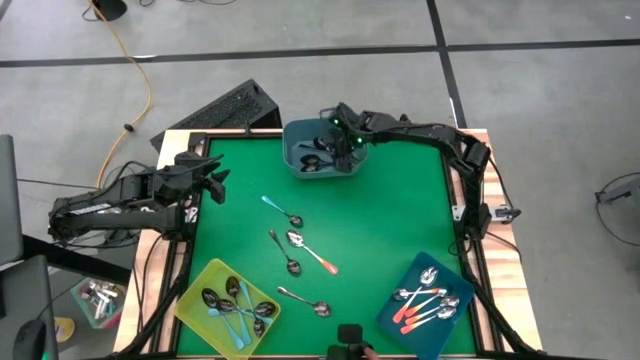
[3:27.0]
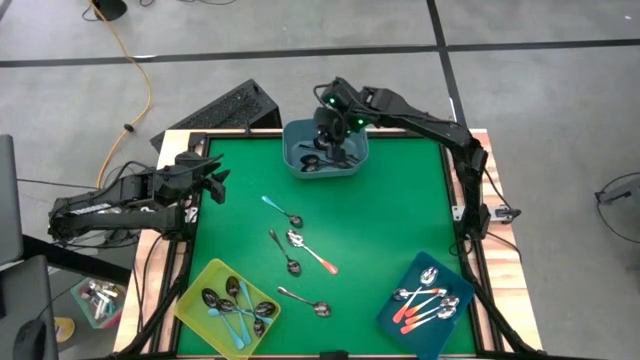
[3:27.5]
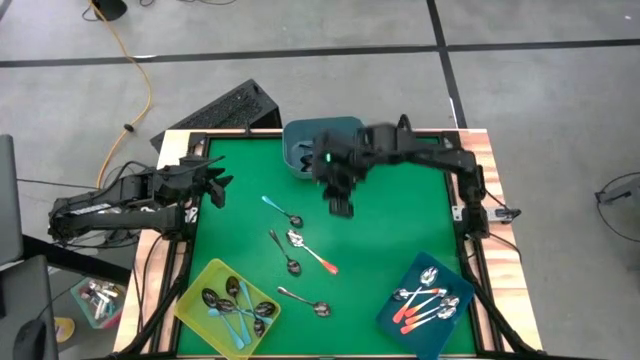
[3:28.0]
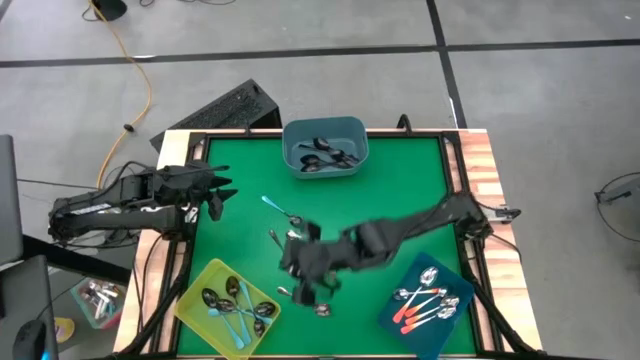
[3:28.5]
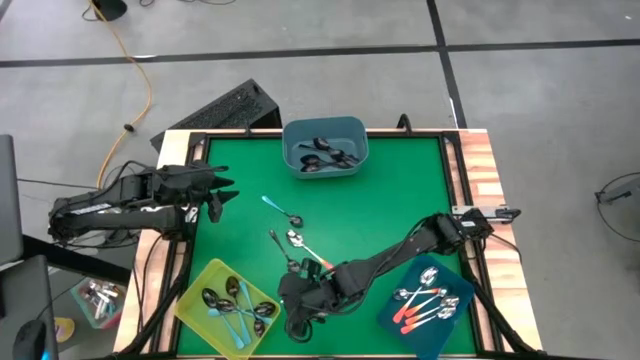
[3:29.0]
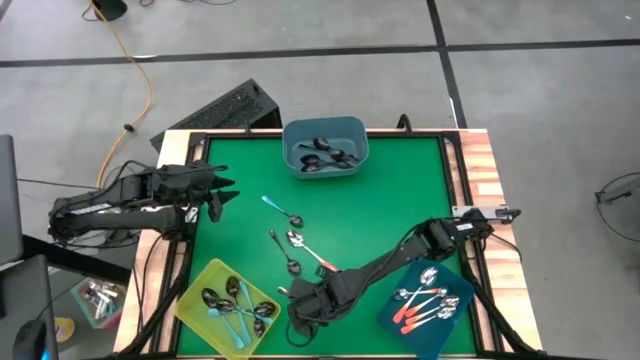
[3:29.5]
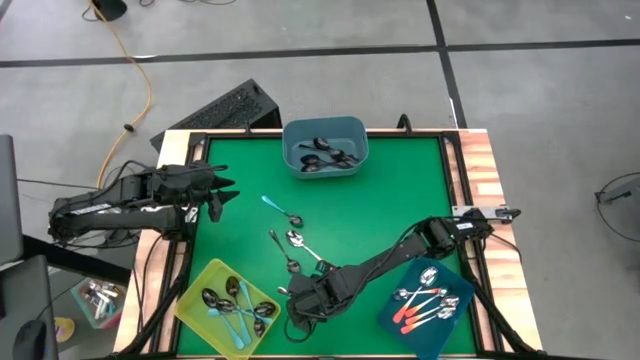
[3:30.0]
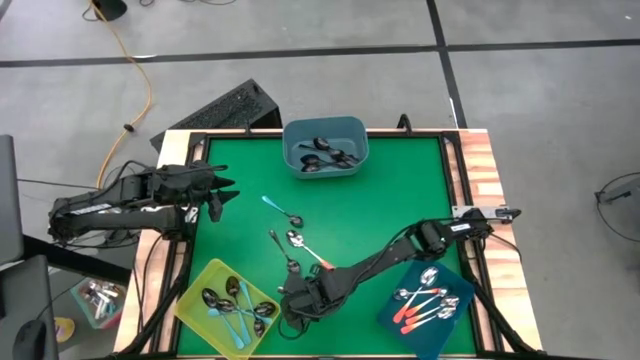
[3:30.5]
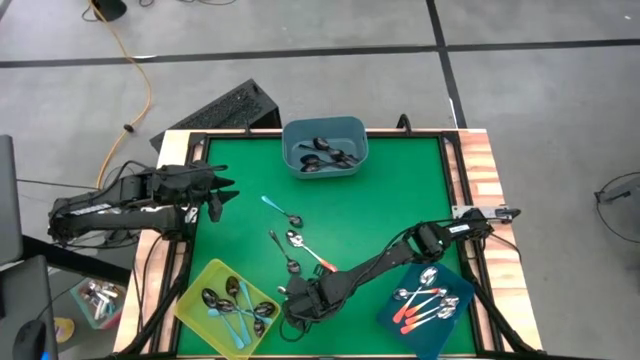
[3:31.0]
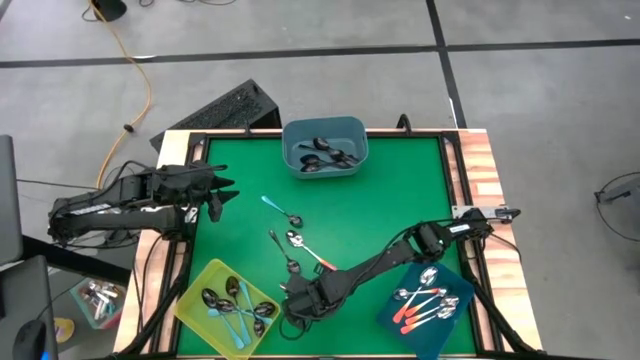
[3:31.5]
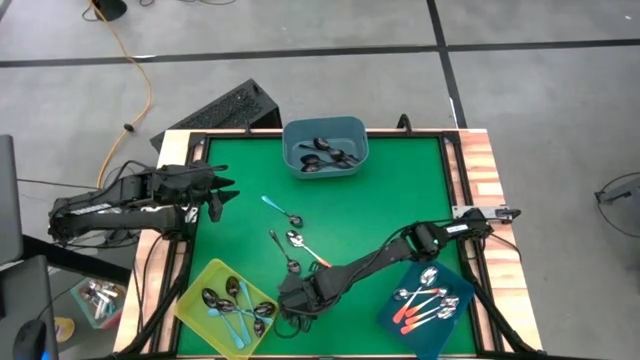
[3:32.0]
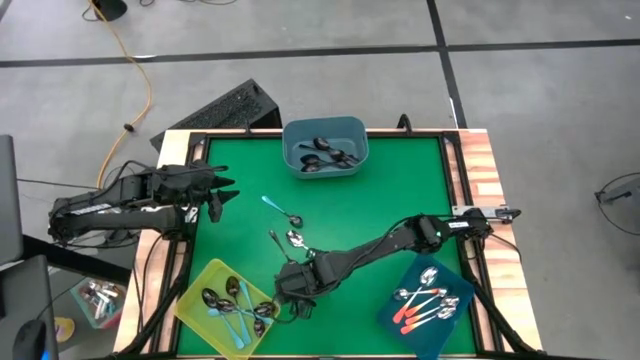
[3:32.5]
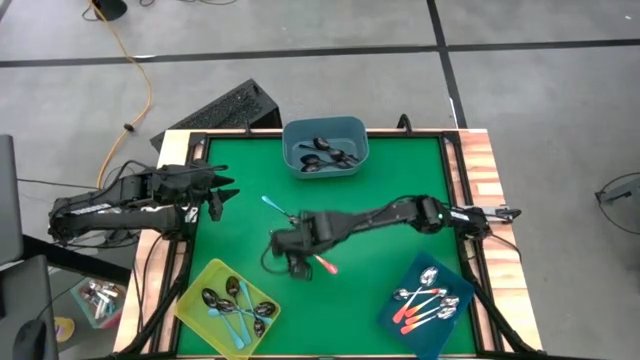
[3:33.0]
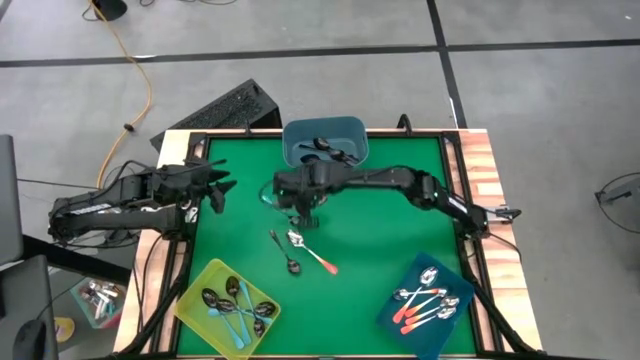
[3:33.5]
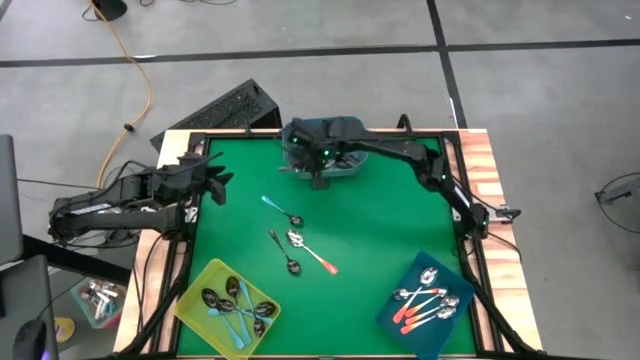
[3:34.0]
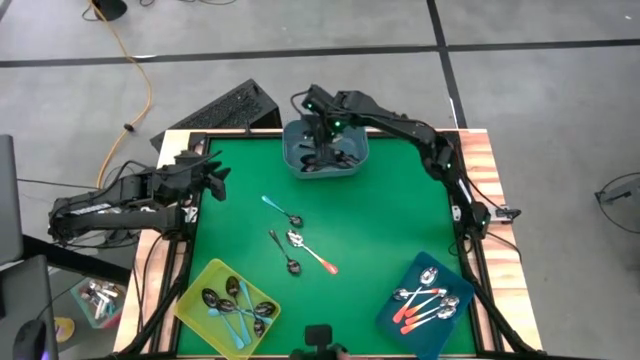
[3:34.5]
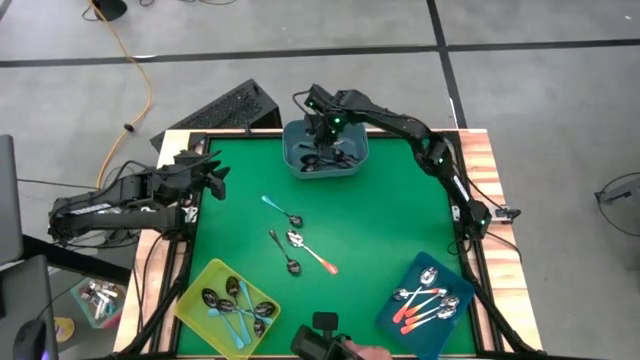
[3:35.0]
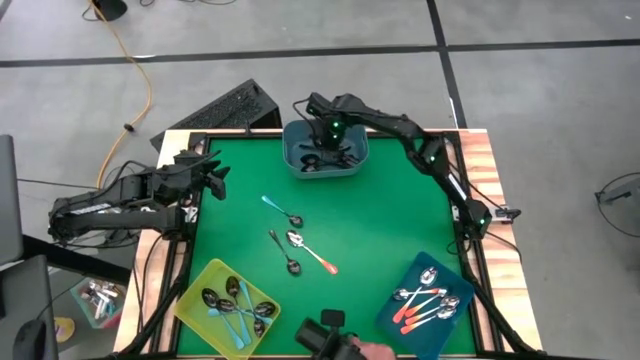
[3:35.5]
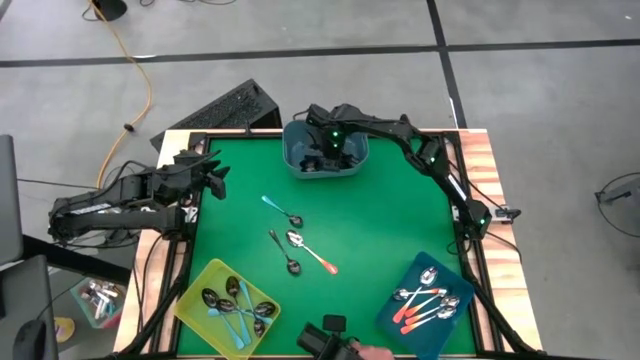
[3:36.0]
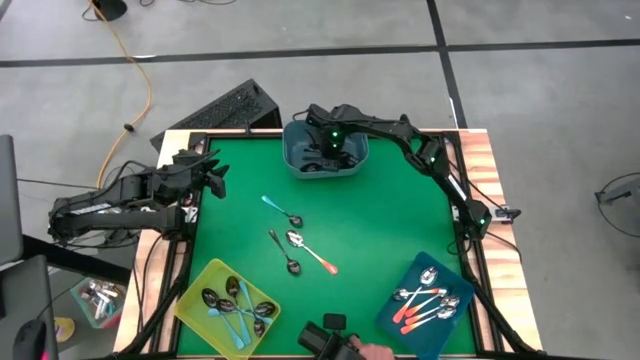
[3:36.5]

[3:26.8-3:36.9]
Task: Sort silverware by color (type)
Put the black spoon into the light blue bin

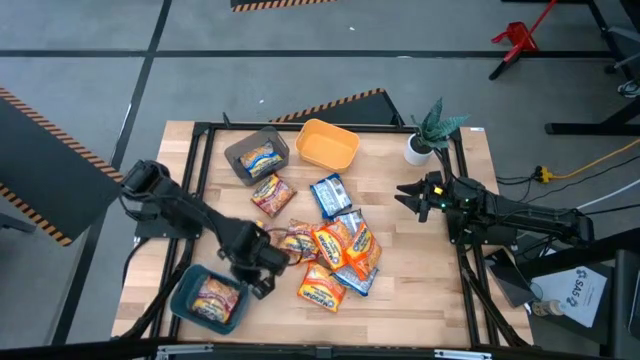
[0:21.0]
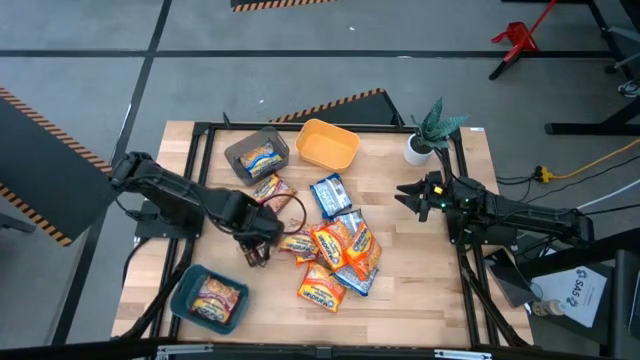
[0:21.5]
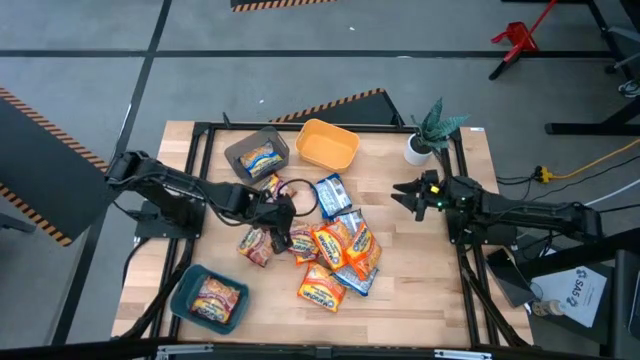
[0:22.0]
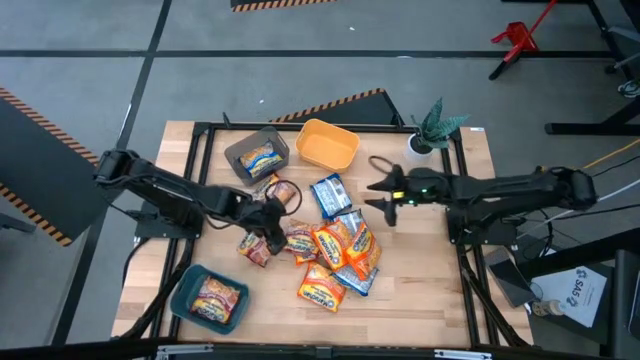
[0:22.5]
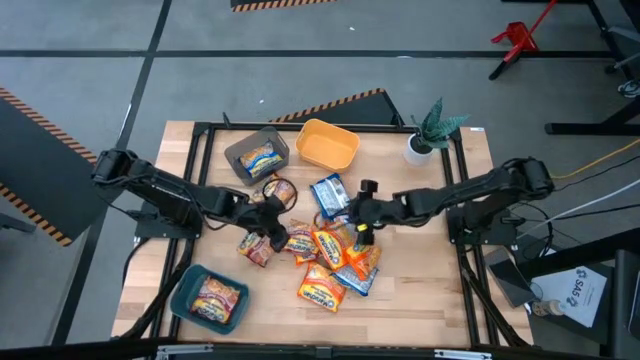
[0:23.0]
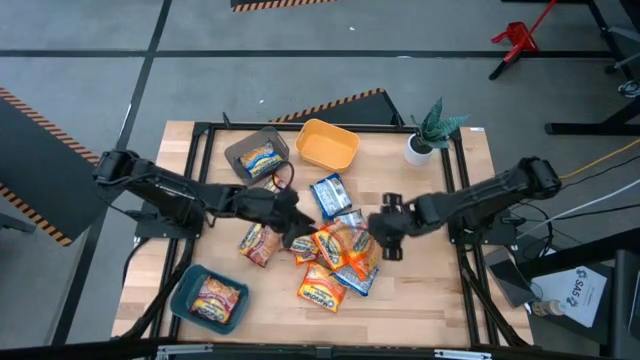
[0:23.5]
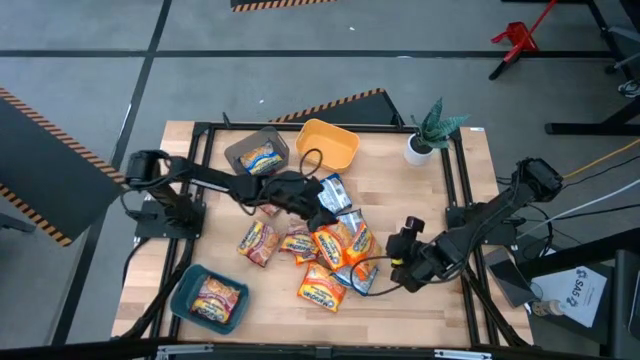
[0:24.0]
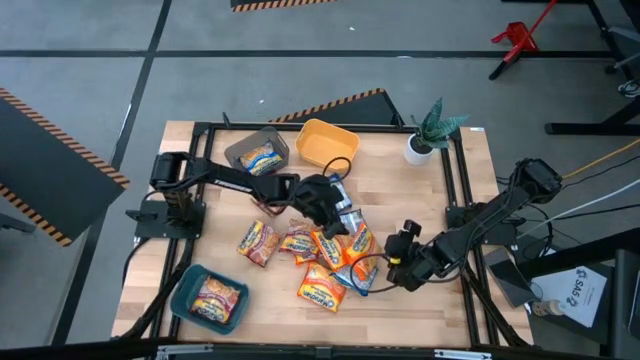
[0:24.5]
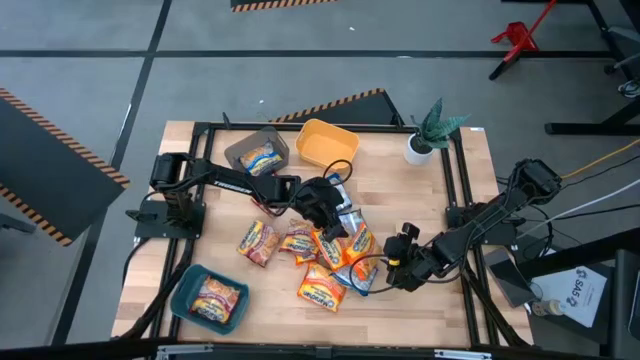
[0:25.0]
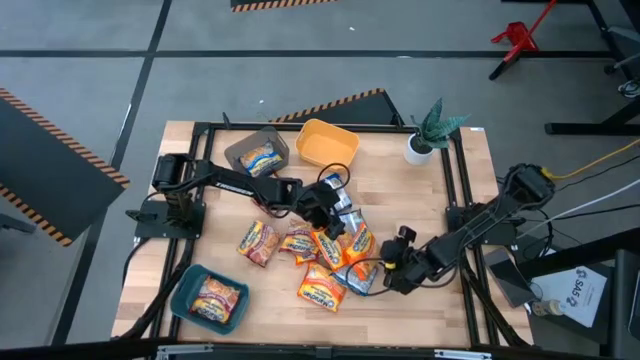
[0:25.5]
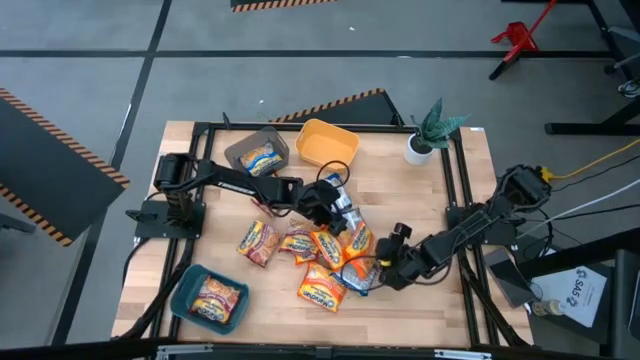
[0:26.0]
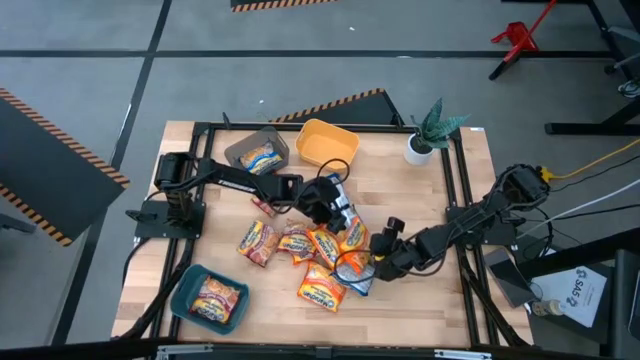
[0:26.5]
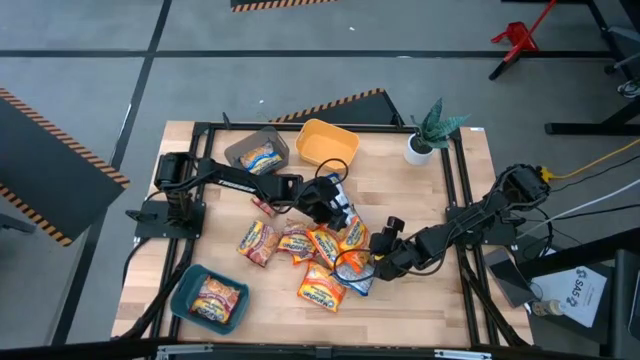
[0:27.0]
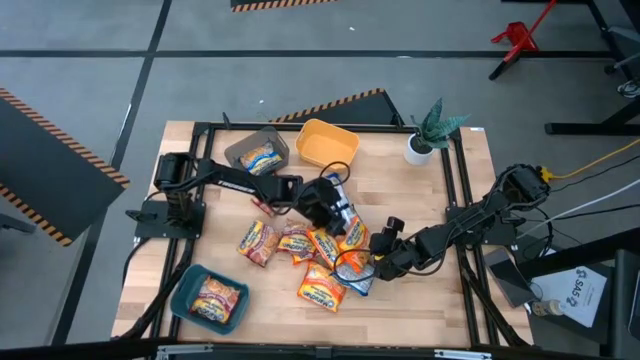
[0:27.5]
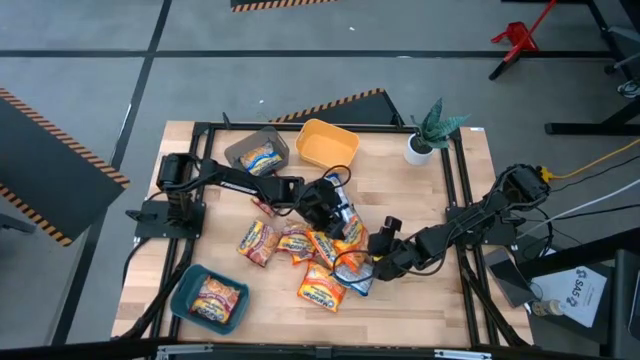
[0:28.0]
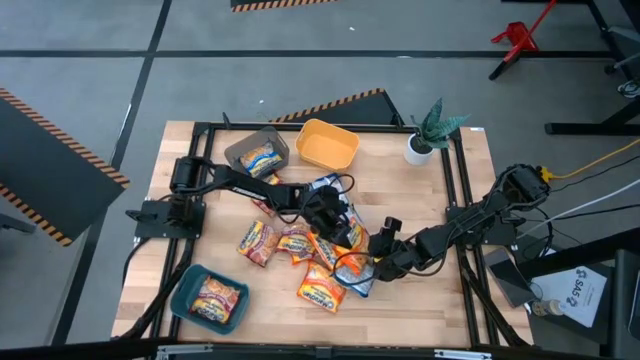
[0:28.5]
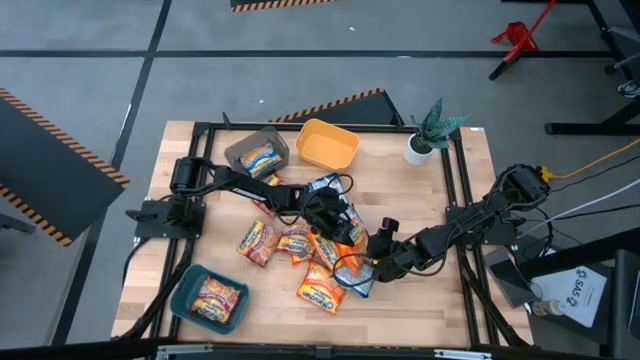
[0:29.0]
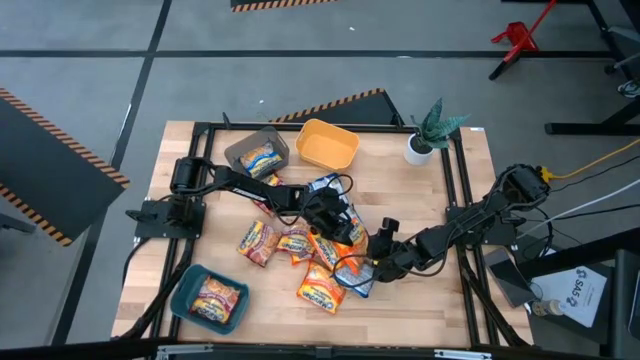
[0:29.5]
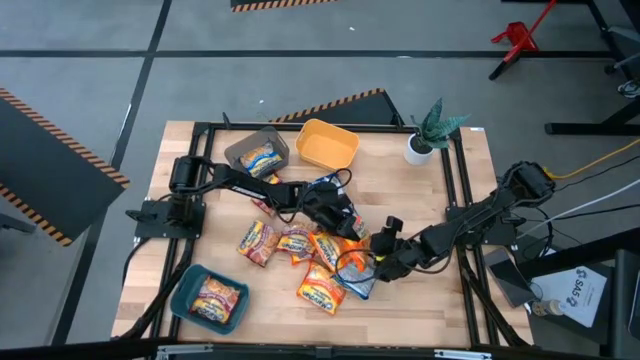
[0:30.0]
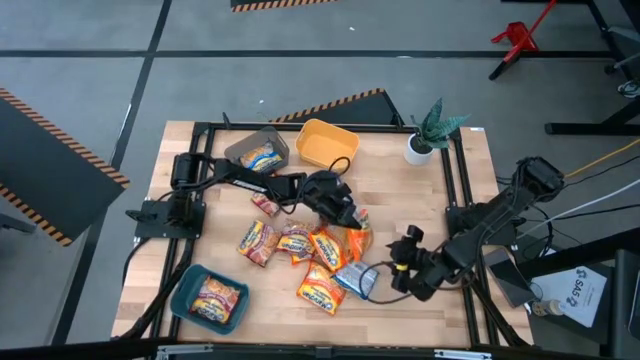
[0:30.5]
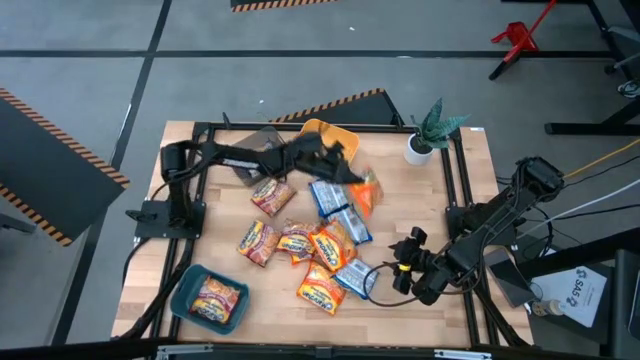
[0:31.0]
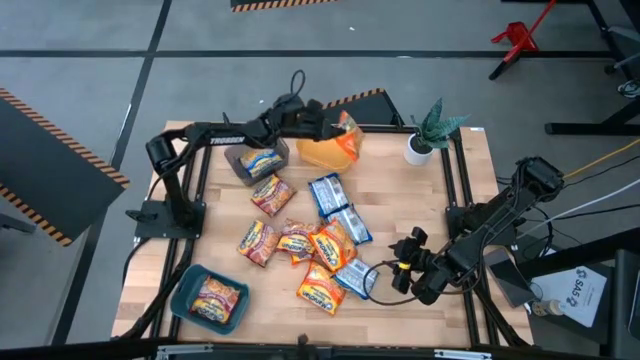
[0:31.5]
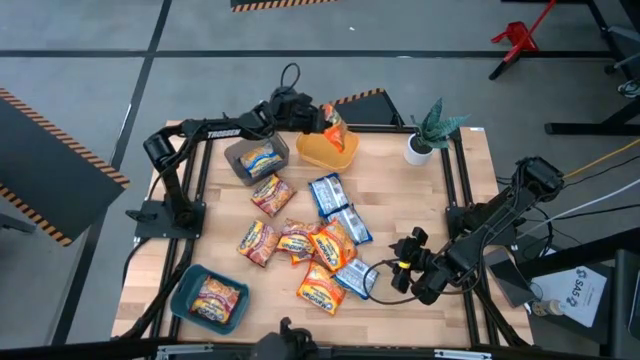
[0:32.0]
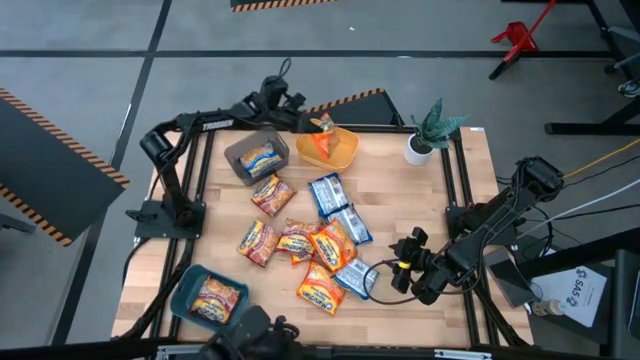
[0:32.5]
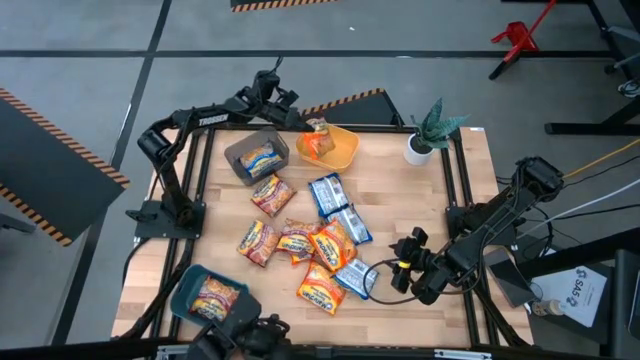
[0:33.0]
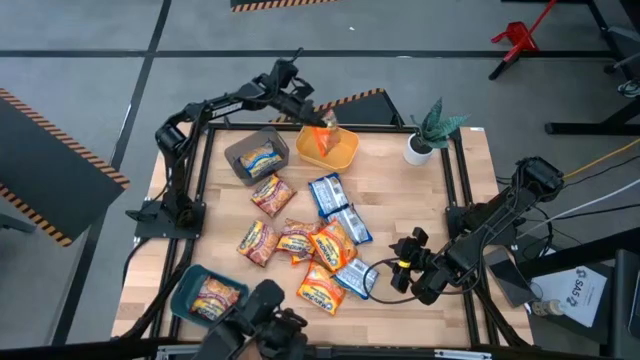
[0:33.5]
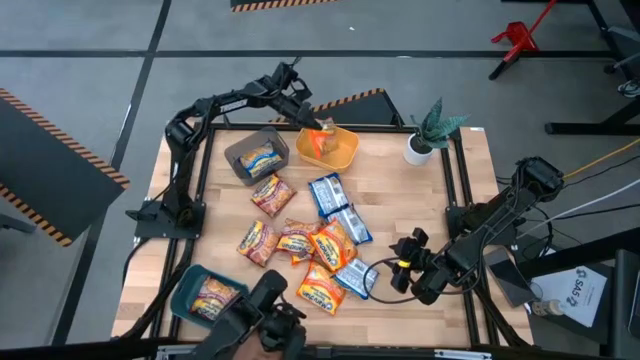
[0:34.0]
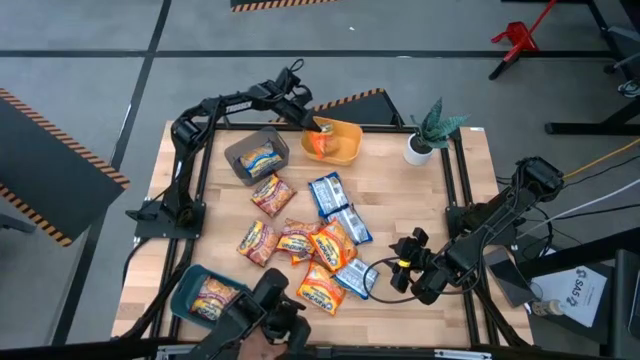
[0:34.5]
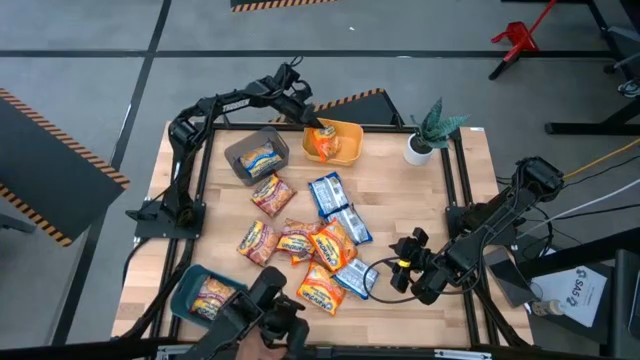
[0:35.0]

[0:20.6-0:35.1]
Task: Sort Maruchan noodles
Put the pack of orange ramen noodle soup into the yellow bin
